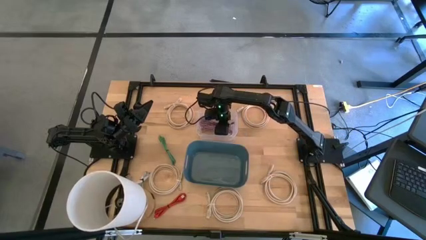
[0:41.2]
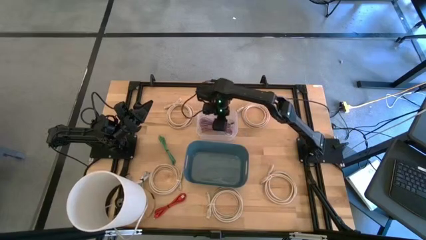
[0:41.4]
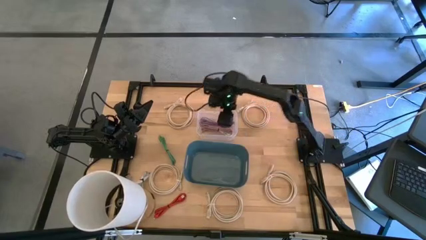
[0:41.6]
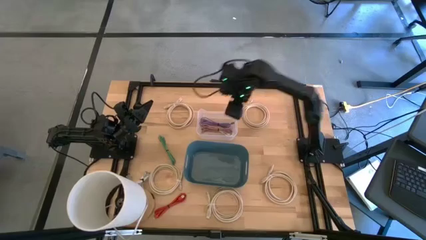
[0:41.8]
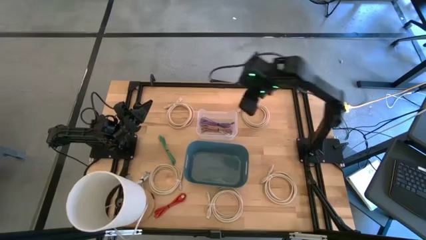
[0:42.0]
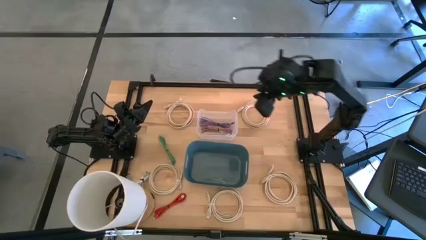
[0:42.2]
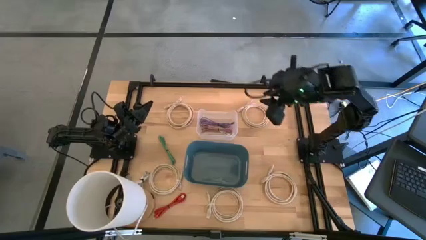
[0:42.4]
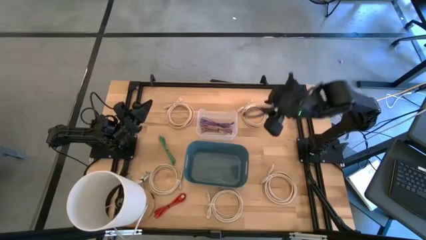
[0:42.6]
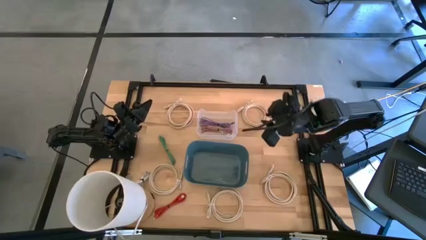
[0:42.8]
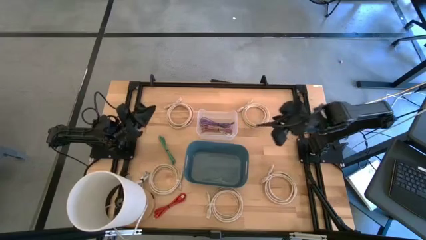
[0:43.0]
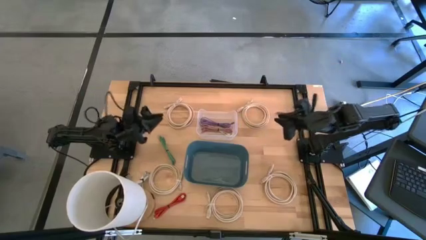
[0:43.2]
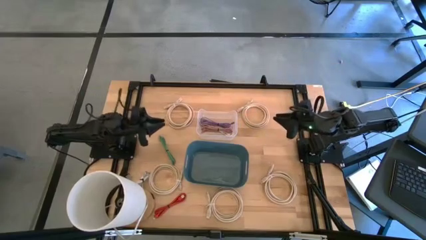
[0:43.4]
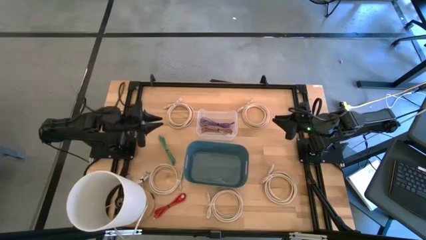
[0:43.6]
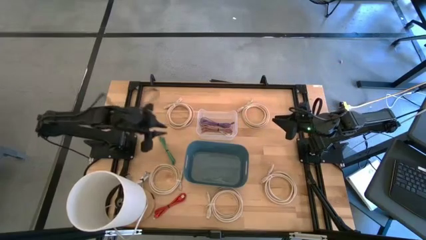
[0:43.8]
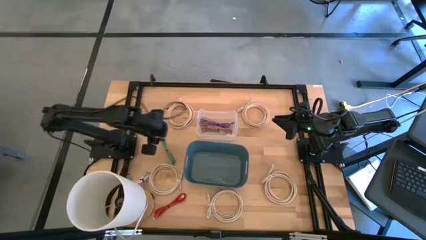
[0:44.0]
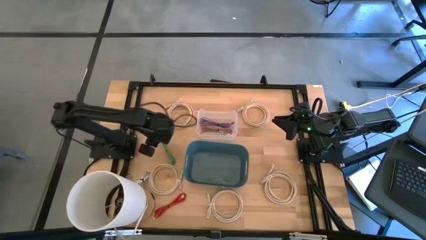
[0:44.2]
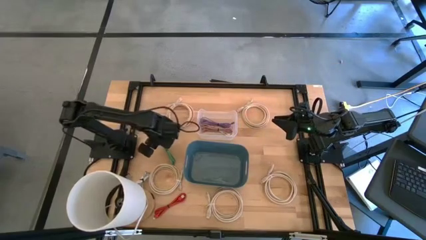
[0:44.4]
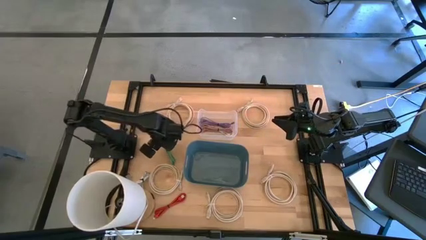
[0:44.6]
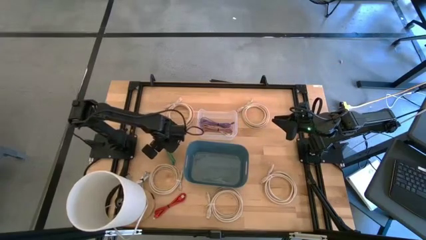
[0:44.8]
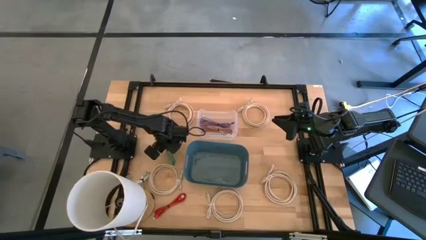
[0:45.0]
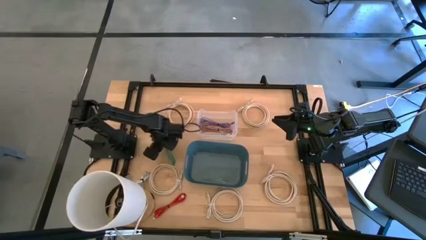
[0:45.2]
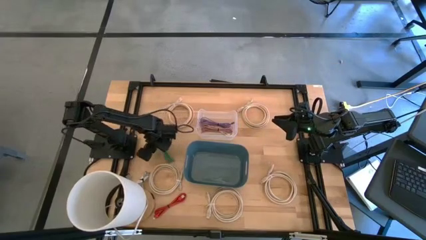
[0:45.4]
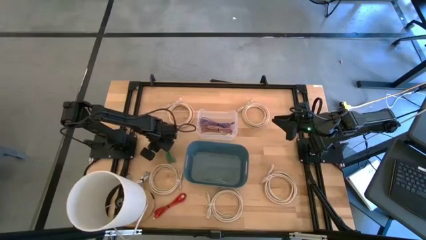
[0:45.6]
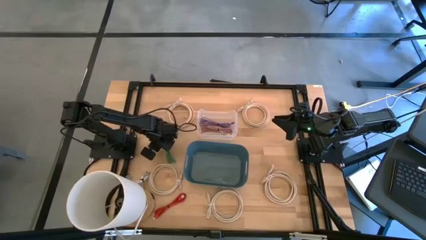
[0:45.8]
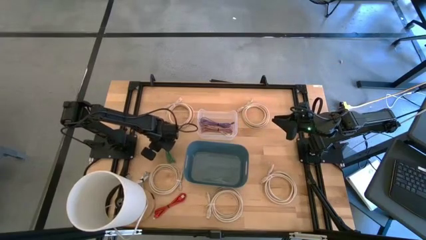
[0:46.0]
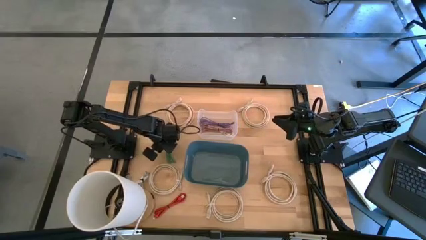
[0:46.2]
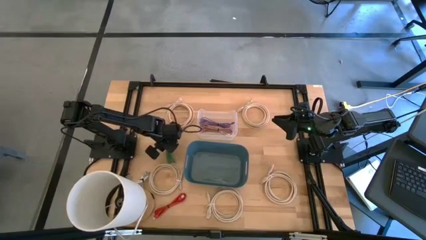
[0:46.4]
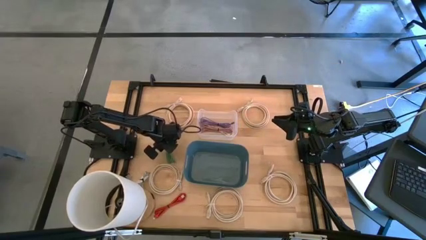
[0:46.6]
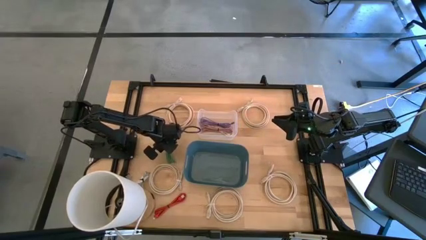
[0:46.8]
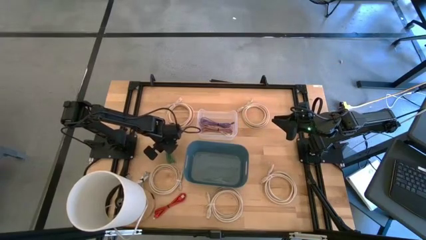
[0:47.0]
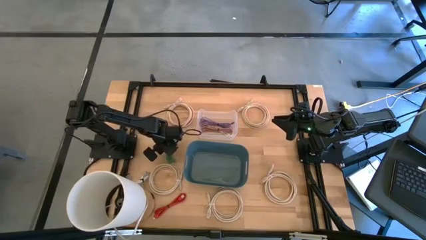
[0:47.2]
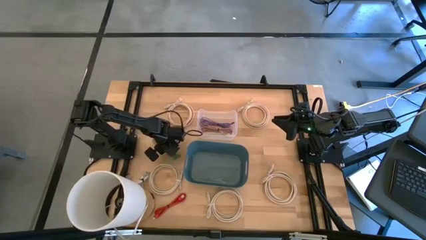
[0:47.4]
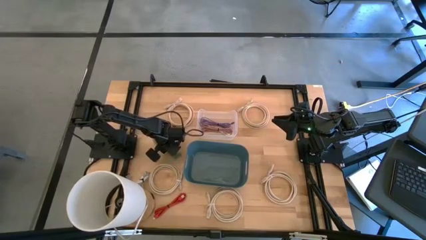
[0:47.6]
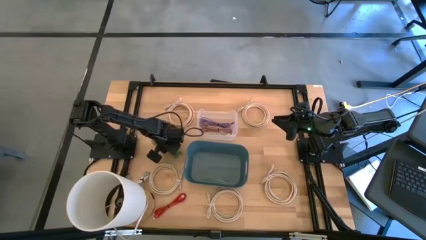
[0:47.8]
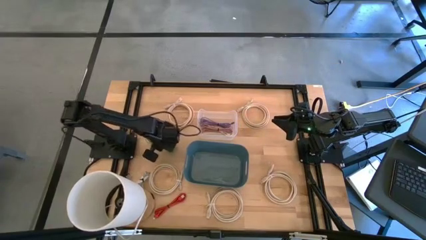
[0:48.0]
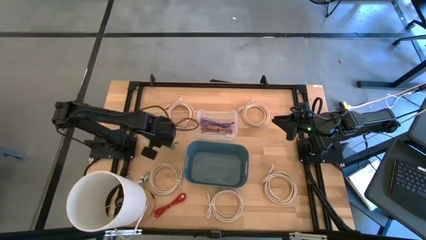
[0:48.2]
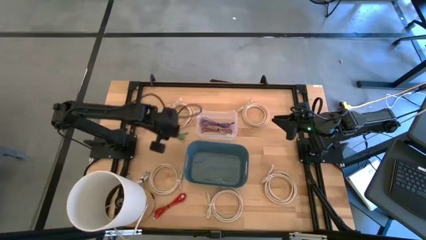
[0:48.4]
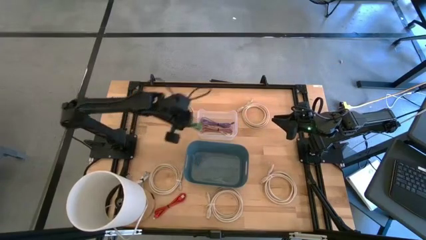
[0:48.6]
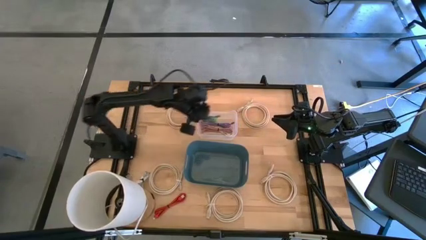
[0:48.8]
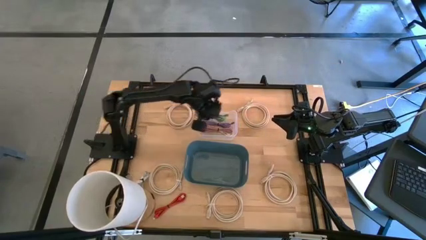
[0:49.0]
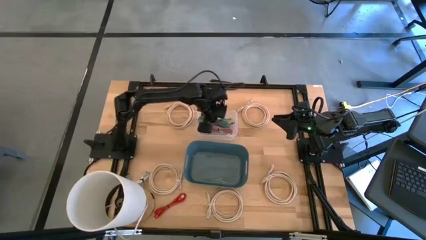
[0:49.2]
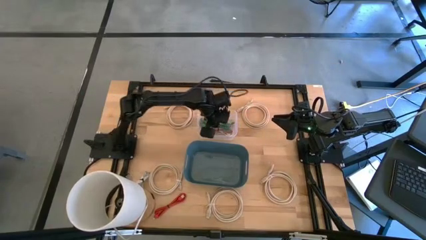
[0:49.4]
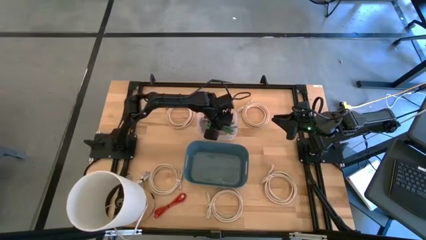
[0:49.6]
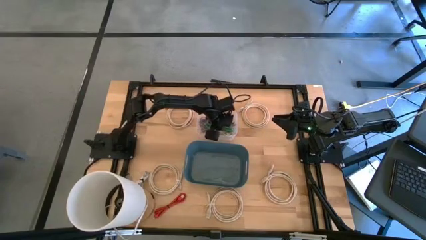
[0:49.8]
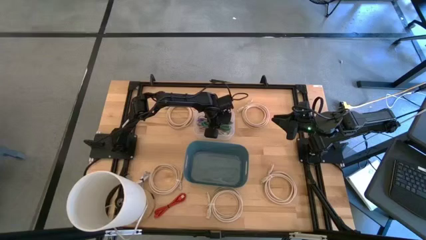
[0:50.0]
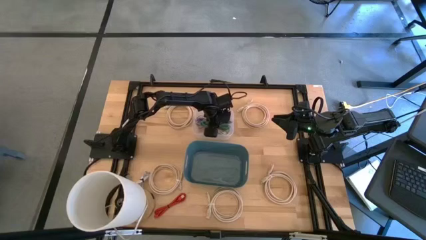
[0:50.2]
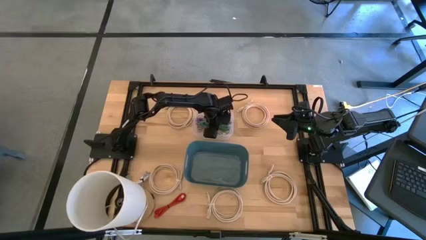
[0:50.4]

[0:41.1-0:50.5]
Put the green charger cable into the transparent bin

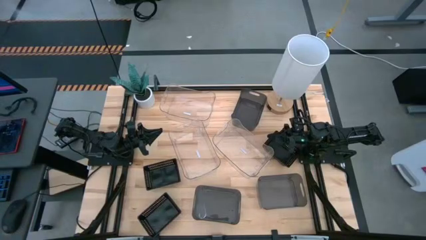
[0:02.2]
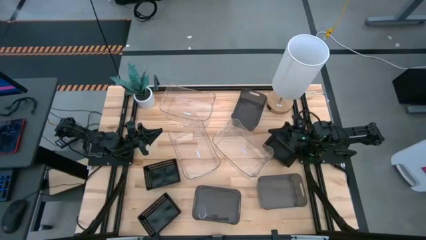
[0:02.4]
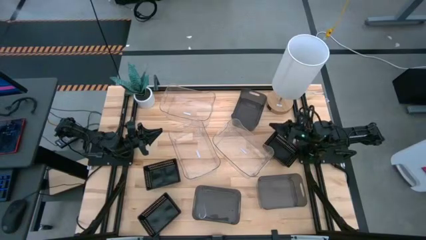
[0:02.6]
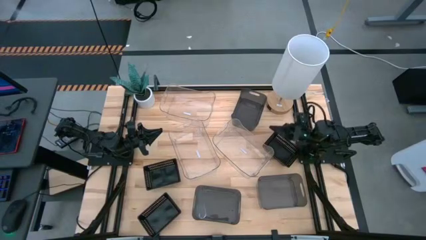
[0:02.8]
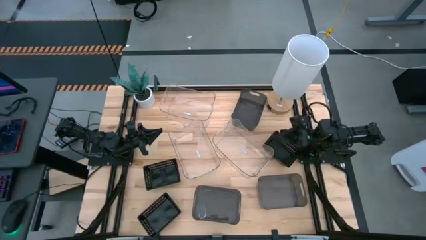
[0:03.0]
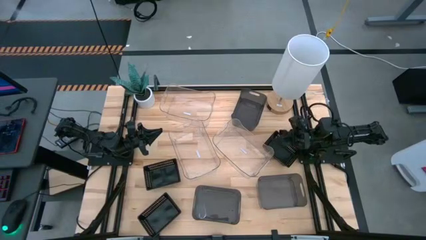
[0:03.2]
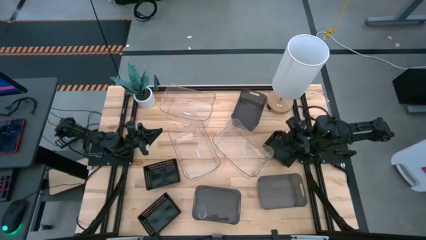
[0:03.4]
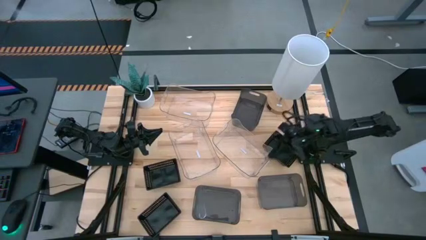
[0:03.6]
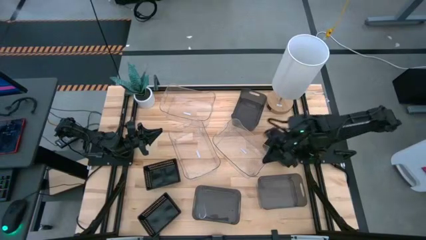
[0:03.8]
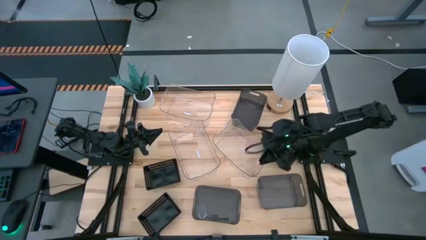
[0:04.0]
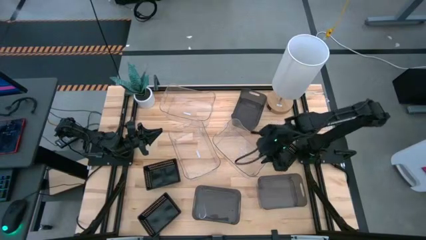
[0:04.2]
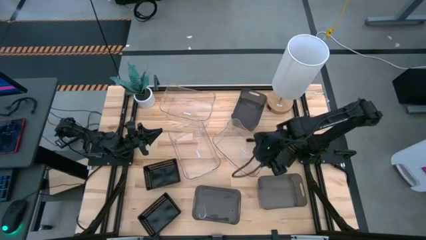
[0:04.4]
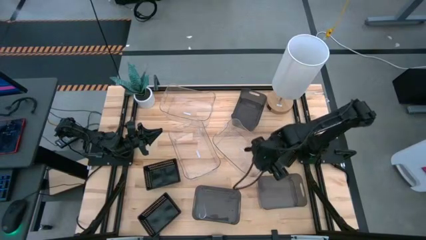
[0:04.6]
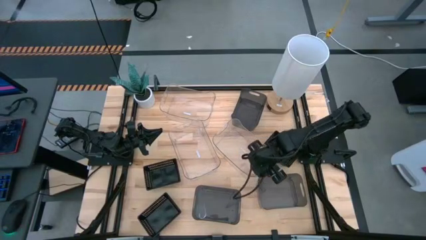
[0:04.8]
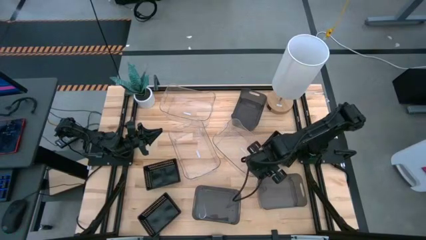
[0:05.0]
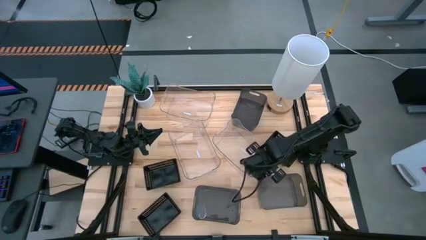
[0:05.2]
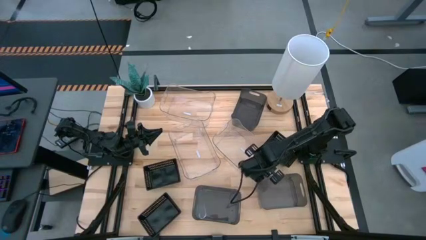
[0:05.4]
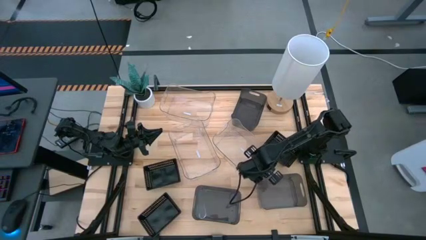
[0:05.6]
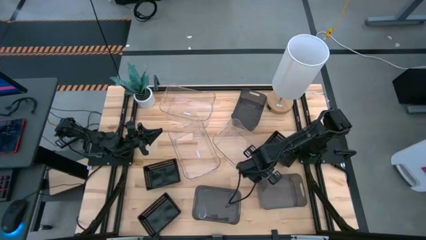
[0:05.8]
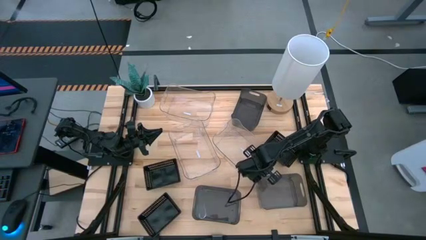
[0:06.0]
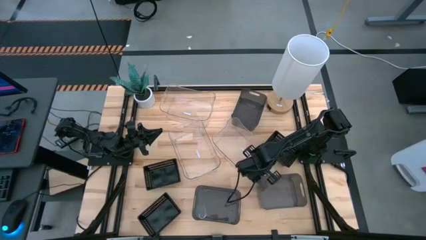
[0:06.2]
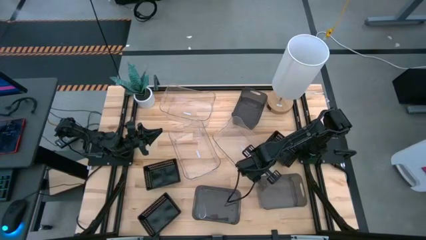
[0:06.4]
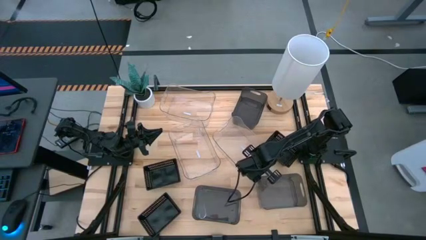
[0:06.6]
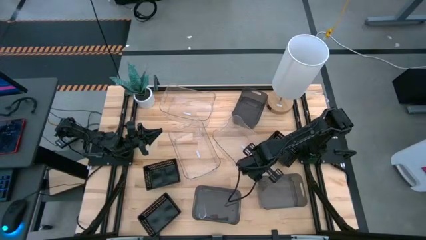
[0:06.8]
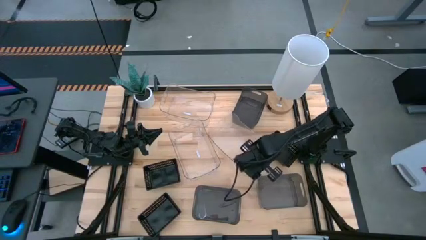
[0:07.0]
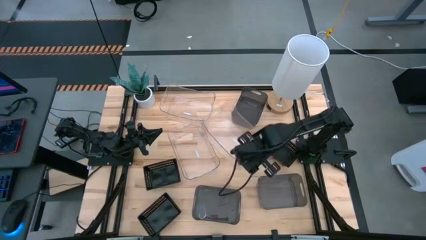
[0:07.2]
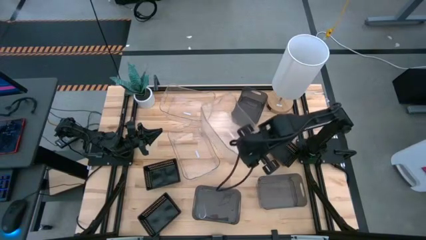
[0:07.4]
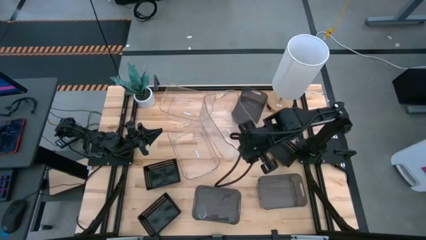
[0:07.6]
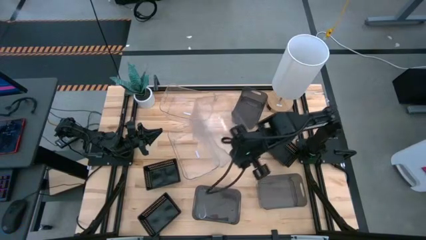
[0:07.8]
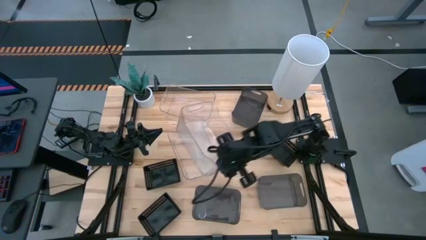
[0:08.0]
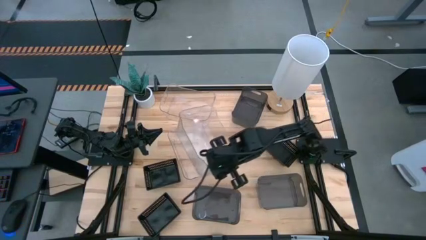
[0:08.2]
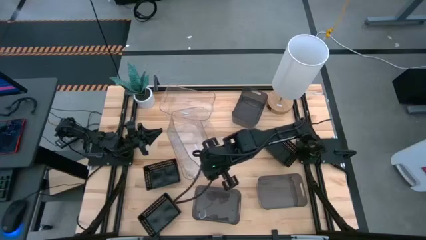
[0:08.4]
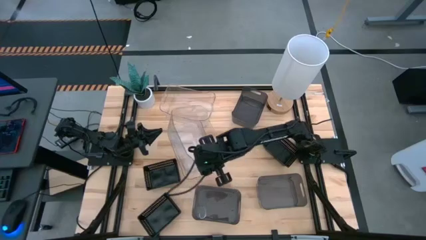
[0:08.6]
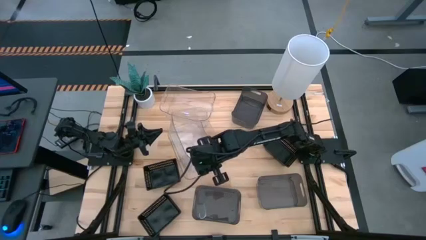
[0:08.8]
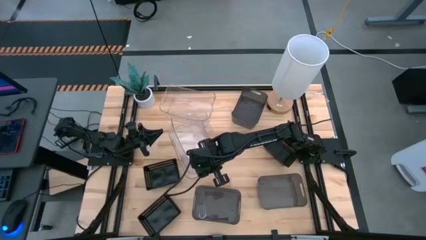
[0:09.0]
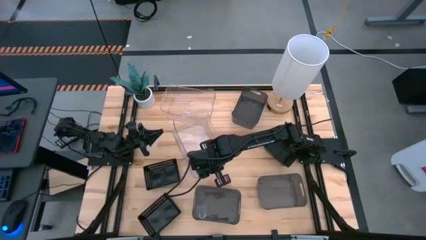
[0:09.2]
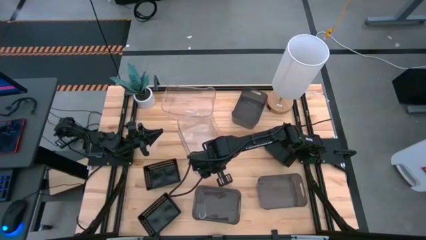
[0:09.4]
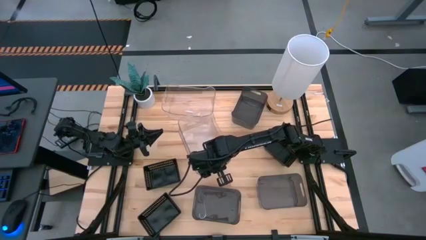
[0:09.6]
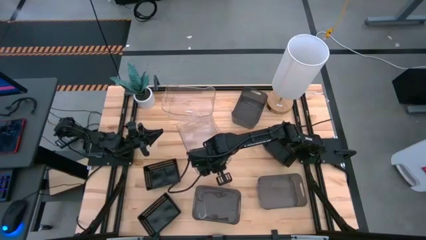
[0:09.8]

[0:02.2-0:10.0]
Stack the bottom right transparent bin on top of the bottom left transparent bin
